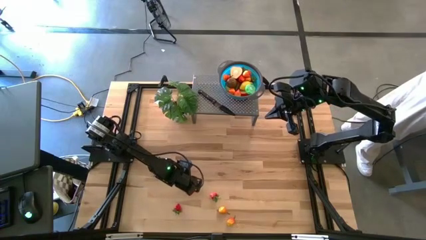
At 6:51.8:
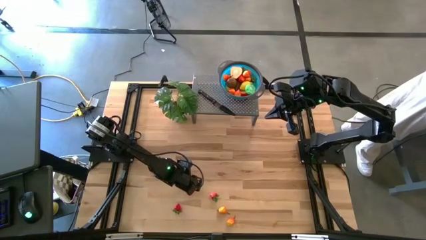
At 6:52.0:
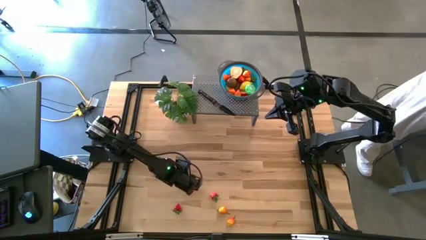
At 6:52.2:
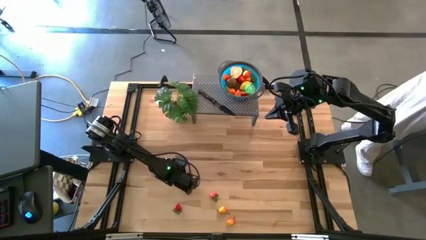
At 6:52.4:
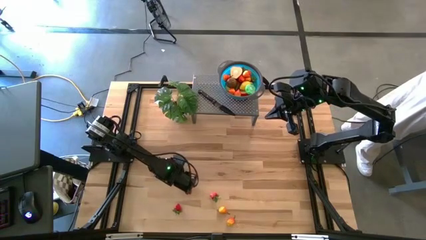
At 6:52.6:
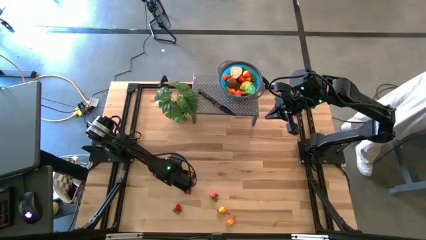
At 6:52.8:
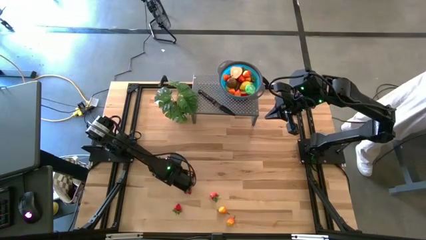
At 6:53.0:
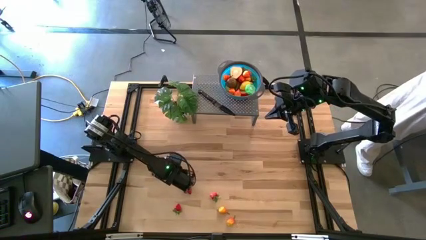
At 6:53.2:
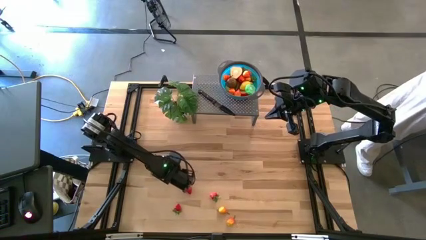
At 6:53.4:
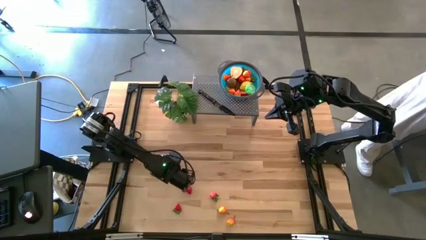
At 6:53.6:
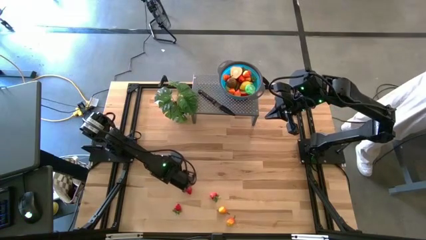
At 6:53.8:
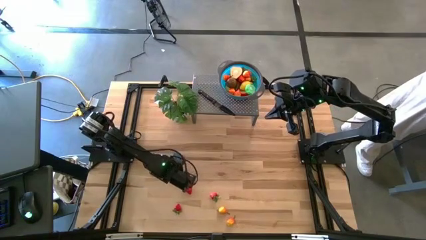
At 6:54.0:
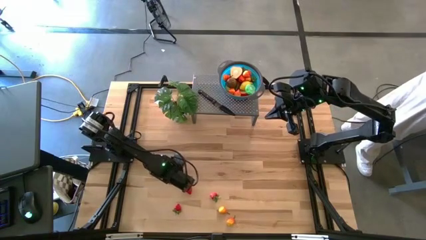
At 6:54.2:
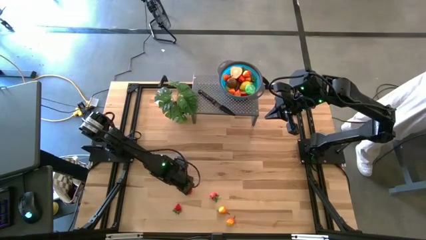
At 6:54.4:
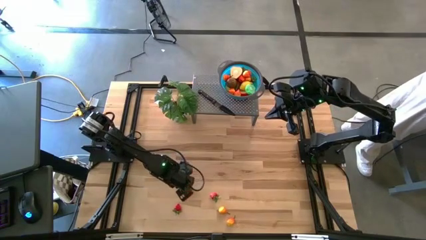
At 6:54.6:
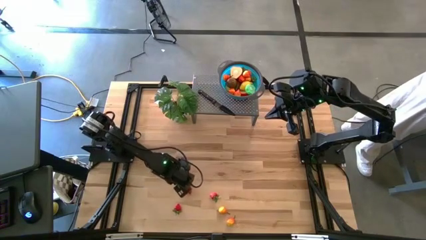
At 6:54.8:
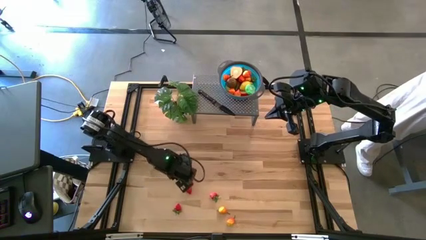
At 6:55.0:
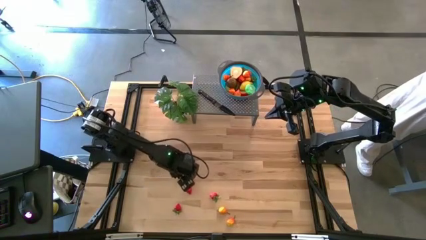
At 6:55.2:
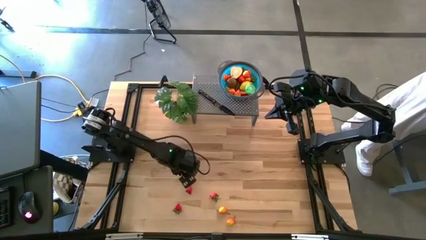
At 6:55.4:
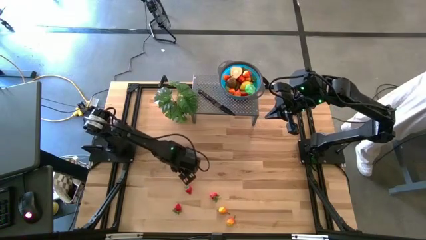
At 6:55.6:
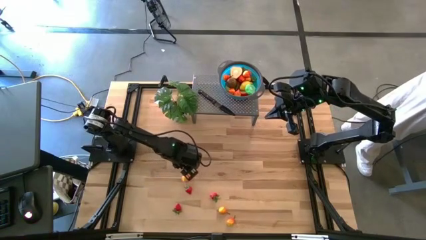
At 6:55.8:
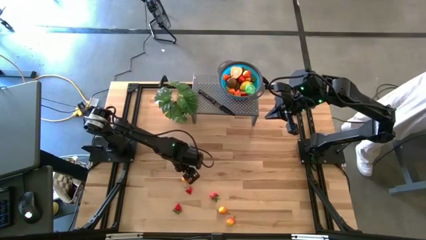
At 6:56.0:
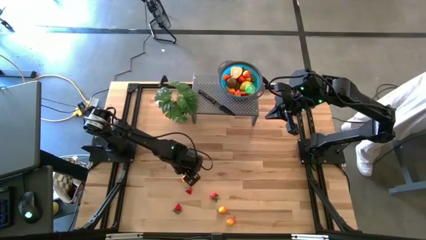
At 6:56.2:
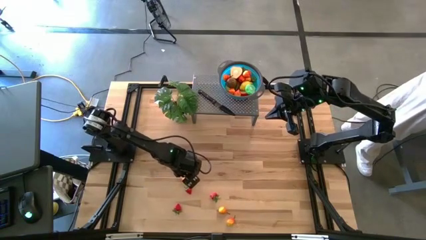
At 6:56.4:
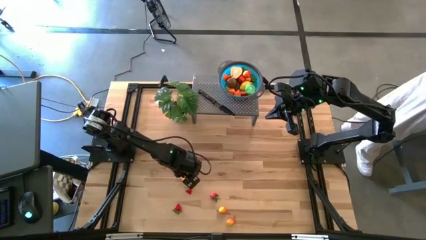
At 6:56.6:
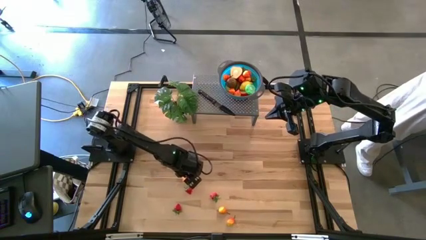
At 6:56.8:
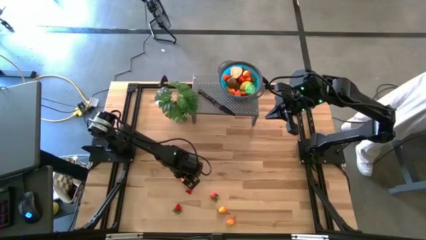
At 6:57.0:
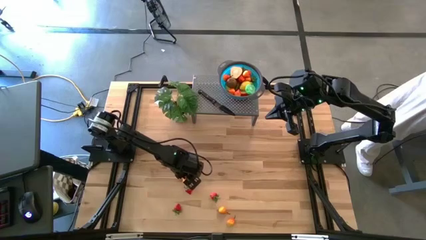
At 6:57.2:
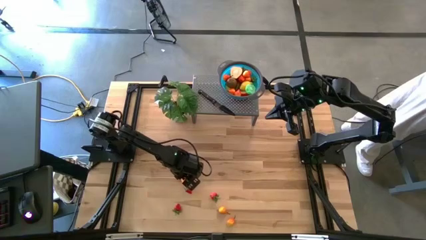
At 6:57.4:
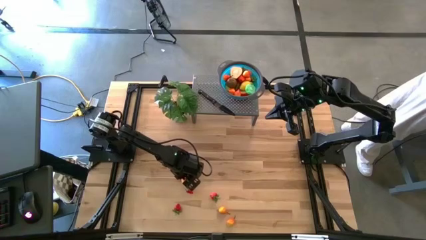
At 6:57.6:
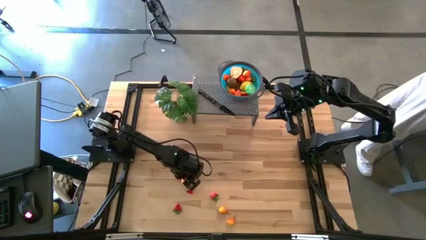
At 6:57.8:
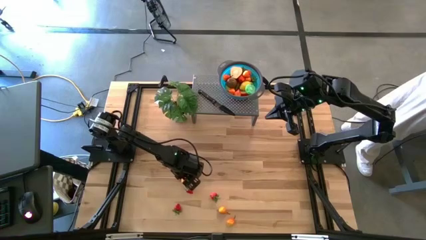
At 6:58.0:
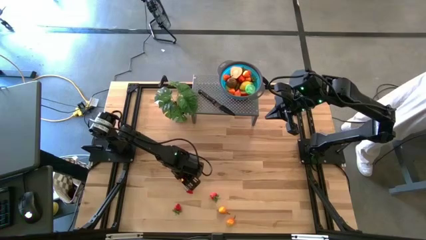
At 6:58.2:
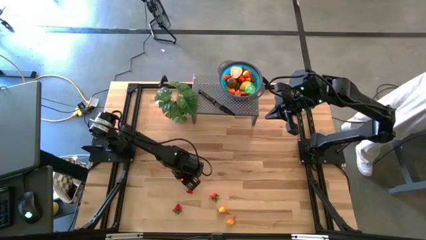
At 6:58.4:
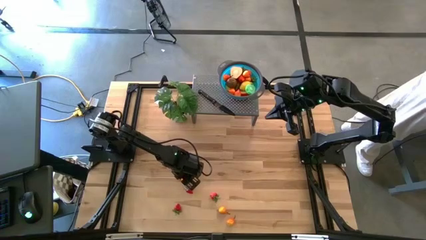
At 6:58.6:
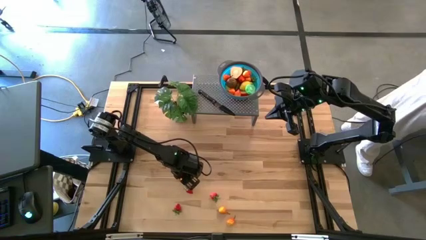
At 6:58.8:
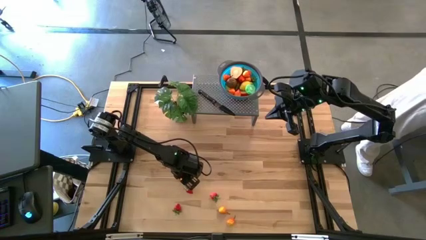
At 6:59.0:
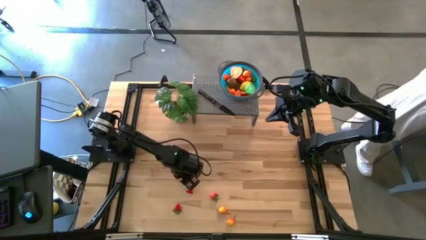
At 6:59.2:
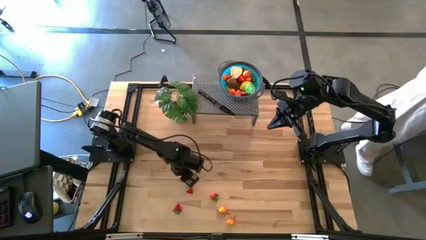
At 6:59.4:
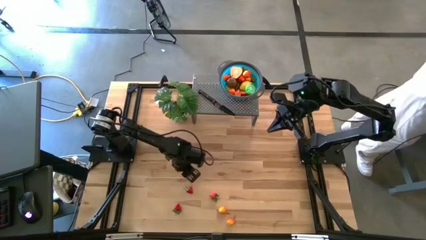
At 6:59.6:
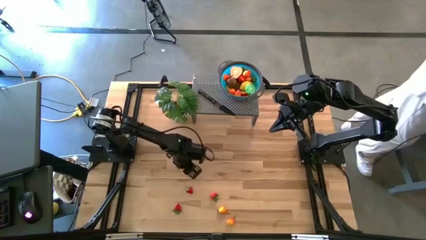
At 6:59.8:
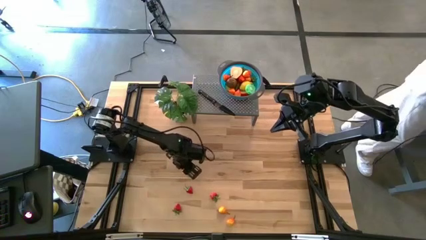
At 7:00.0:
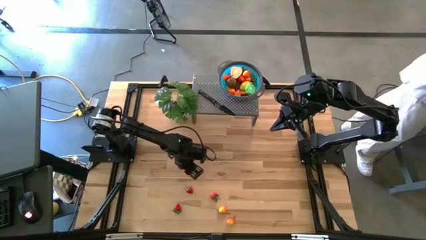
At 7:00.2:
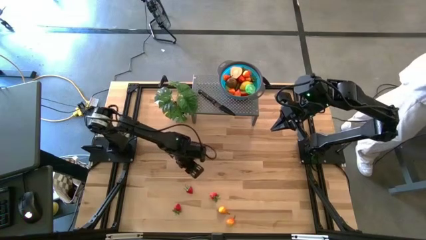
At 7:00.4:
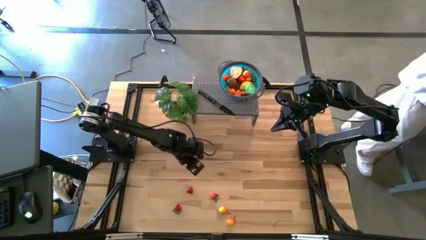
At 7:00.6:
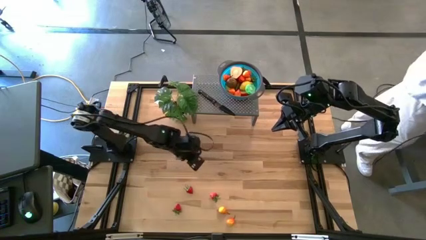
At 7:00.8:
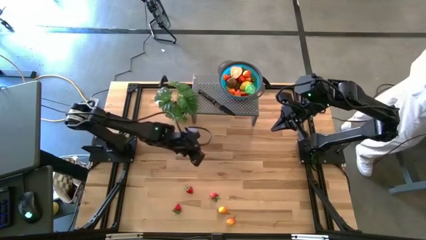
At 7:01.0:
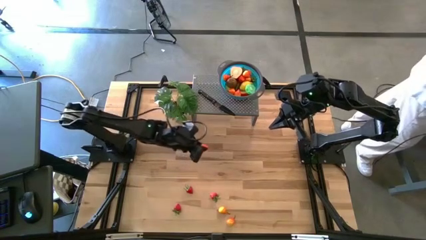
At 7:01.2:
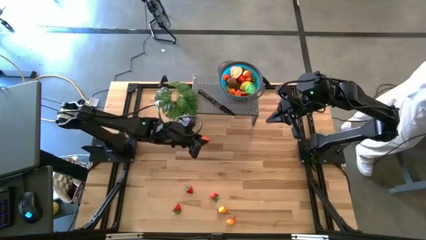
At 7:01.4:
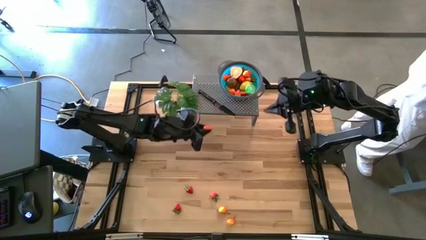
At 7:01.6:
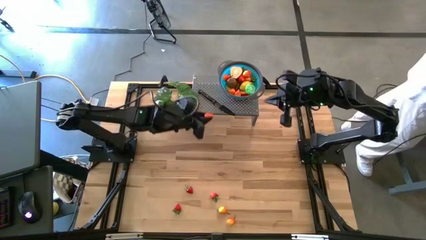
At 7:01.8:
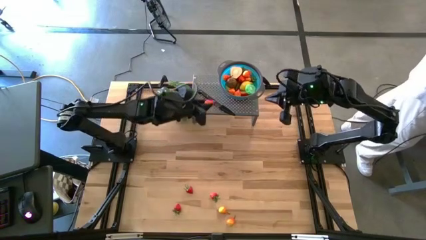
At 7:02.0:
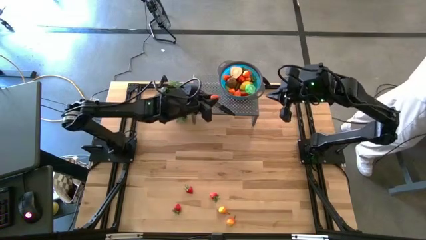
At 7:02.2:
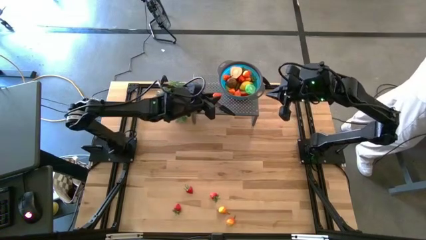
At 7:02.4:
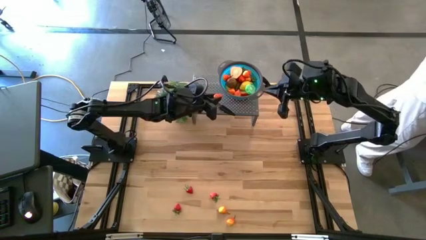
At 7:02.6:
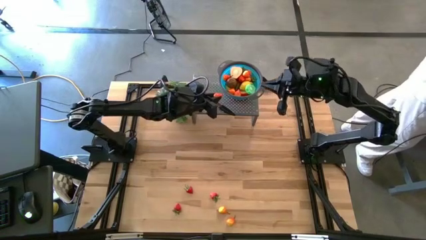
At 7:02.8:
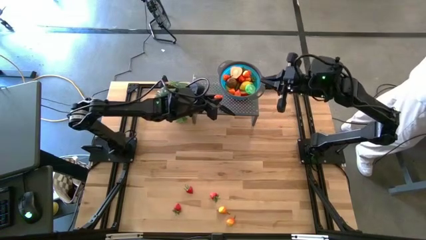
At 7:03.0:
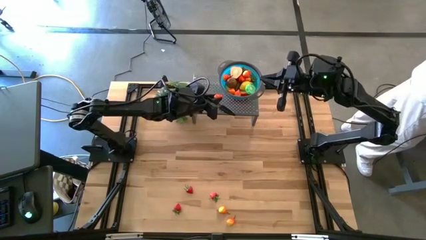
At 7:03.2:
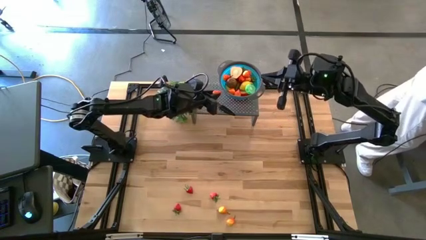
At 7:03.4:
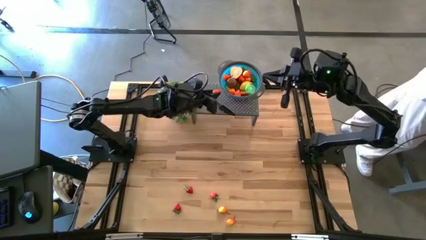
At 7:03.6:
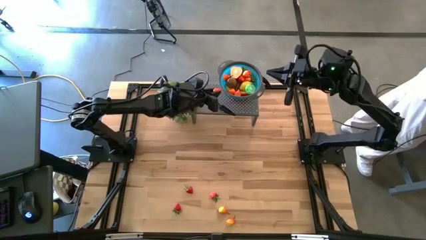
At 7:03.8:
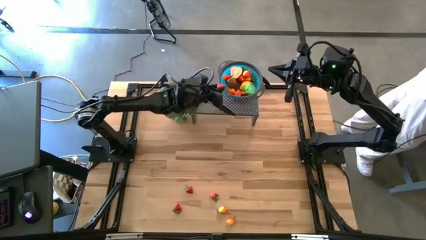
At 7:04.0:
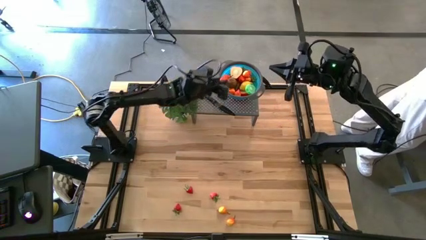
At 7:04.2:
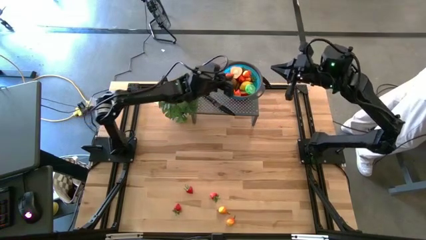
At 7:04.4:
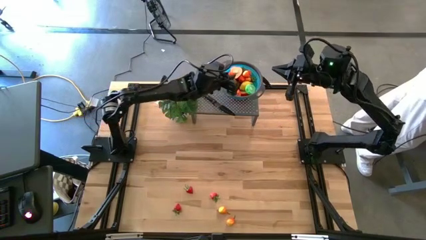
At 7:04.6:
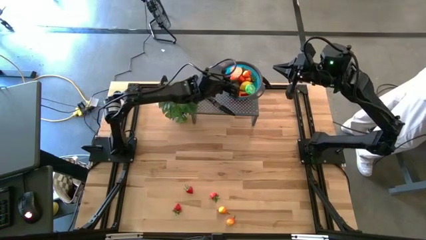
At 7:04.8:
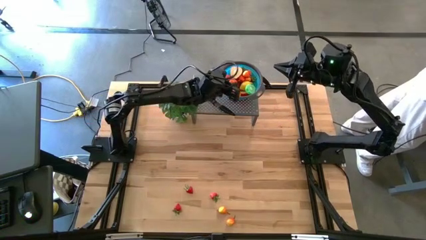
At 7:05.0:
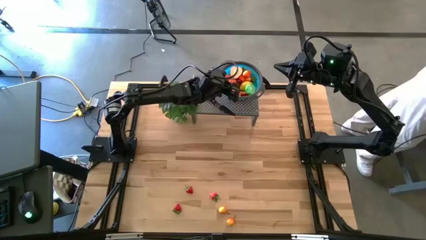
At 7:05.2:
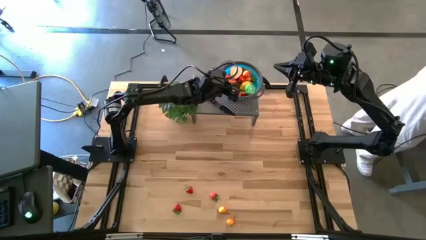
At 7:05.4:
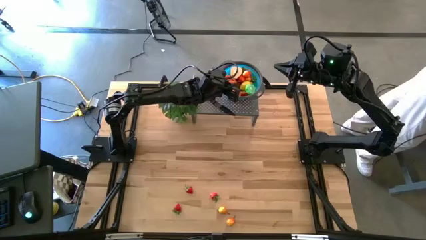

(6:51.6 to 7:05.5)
Task: Pick & Place Fruit
Put the yellow pear in the blue bowl on the shelf

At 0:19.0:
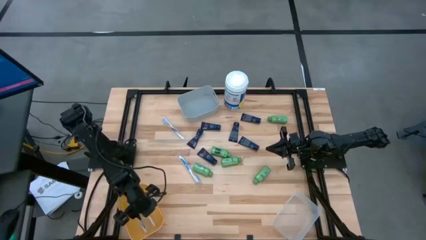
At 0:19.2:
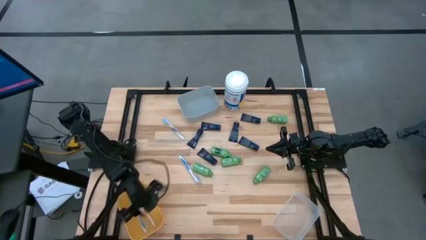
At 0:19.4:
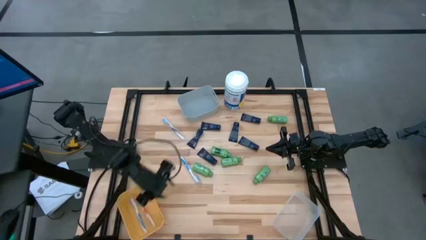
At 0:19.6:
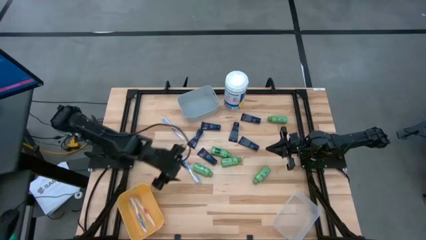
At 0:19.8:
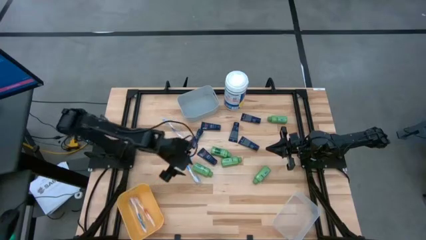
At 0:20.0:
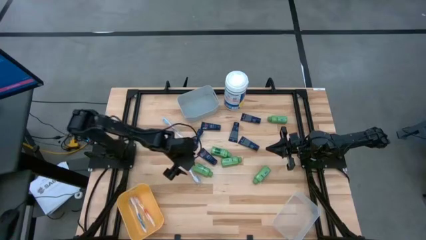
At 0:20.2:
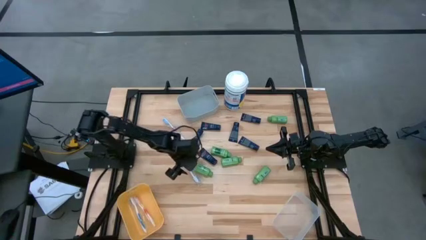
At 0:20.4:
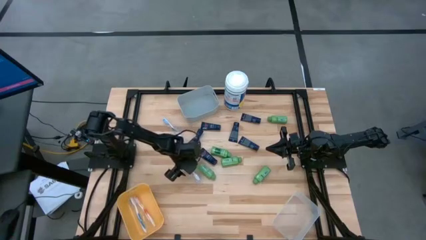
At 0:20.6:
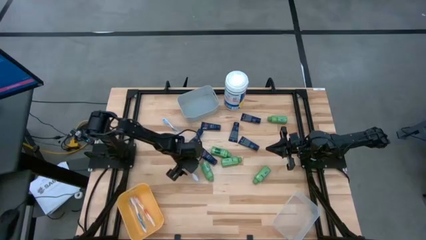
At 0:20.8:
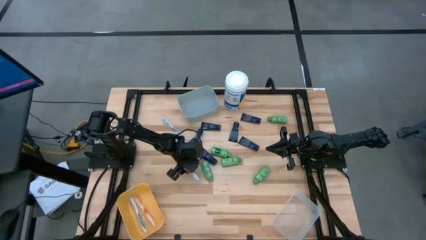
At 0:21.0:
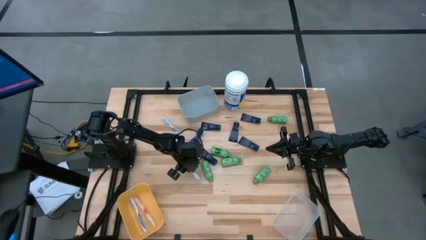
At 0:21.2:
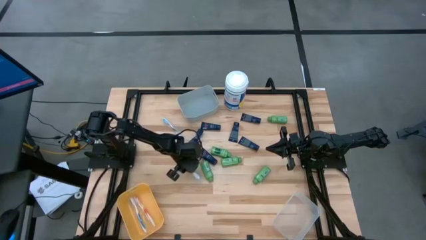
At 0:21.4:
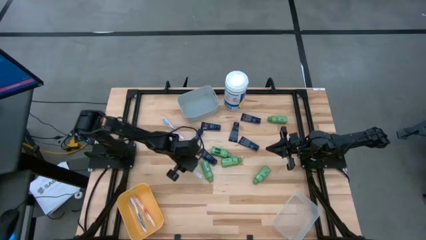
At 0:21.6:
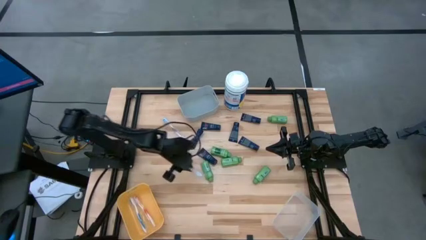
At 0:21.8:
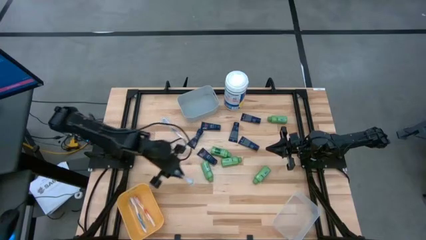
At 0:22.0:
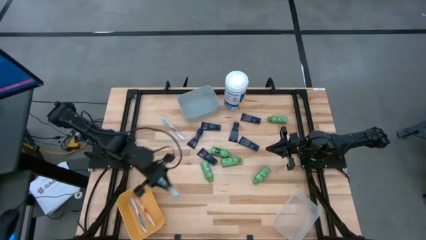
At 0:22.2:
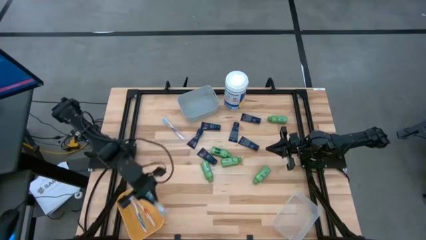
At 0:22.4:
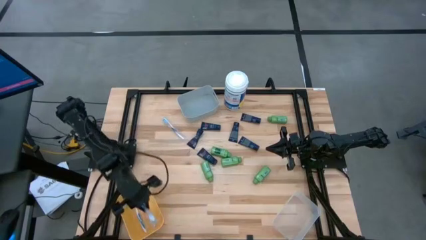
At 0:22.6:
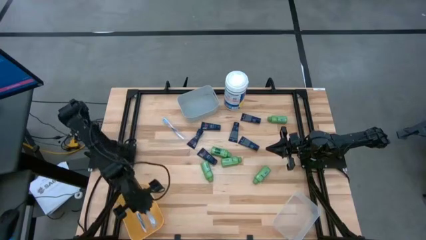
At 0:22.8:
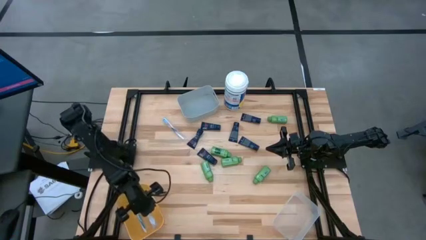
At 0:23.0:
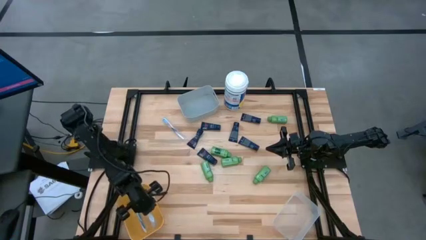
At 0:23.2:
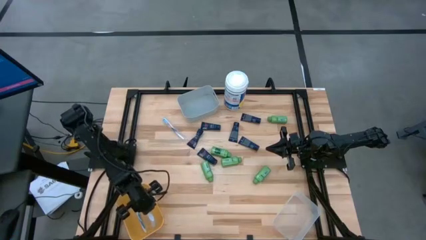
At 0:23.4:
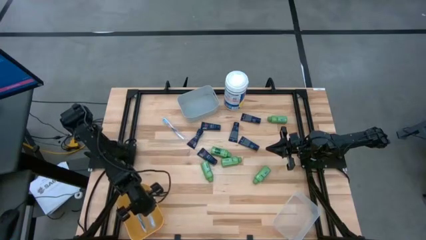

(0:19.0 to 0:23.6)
Task: Pick & Place Travel size toiletries
Put the blue toothbrush into the yellow bin
